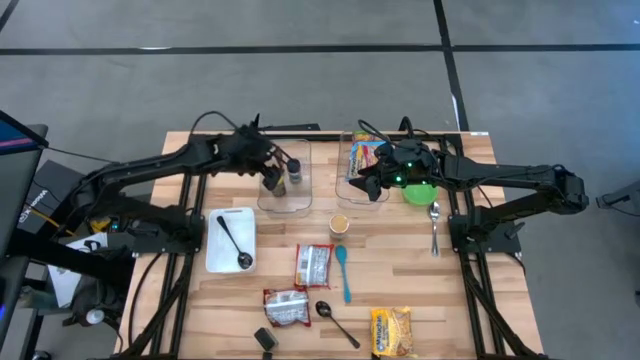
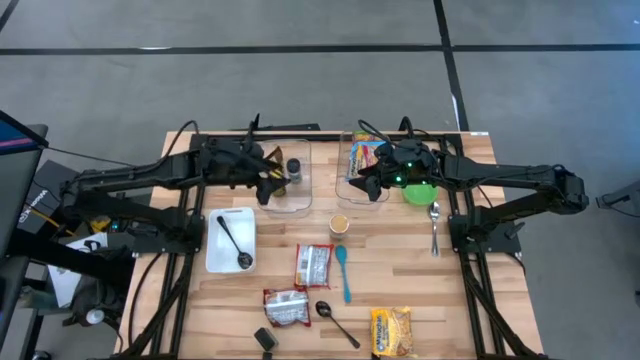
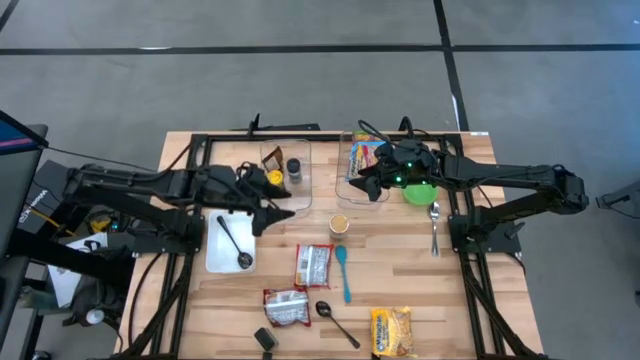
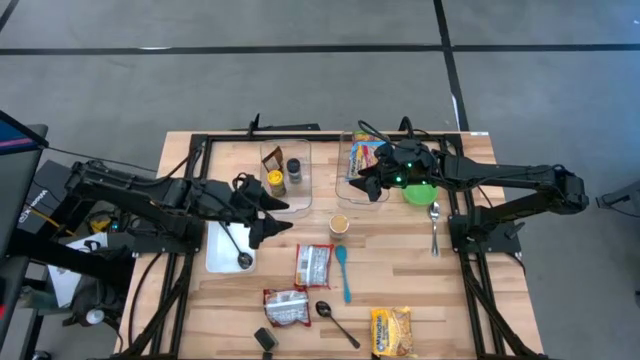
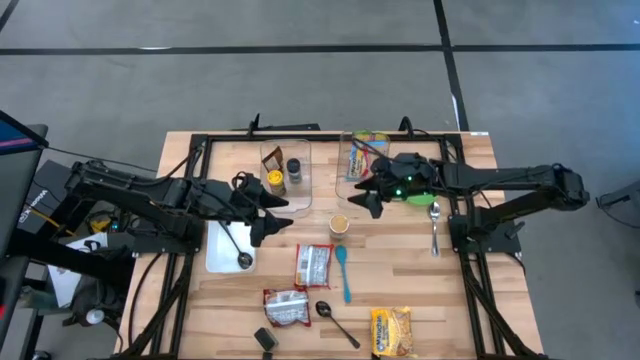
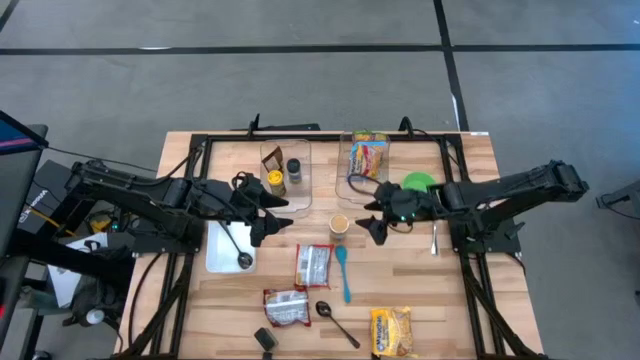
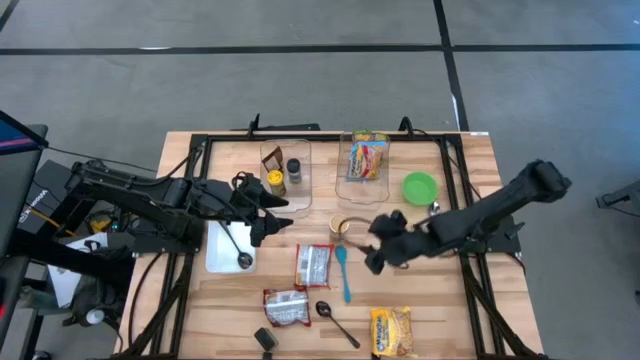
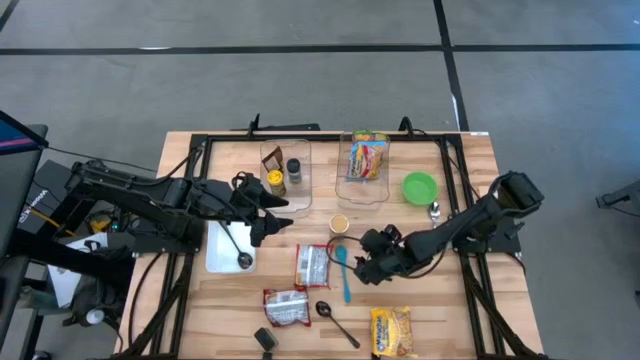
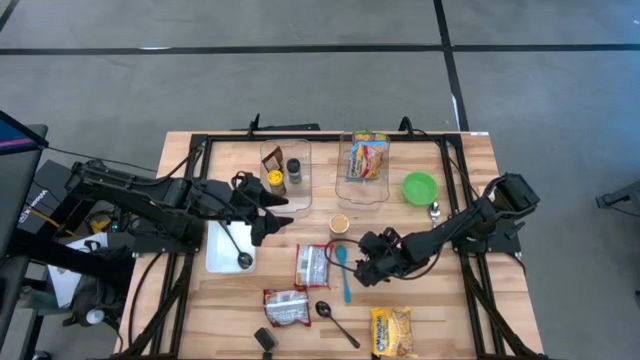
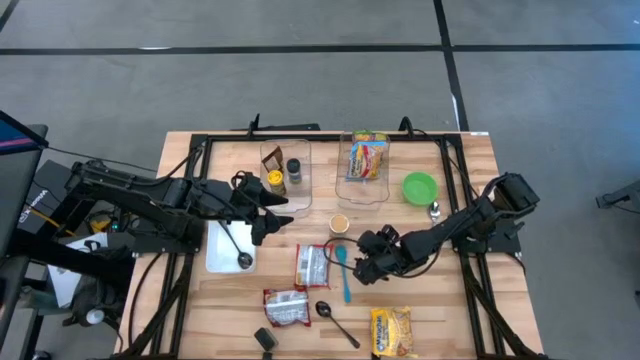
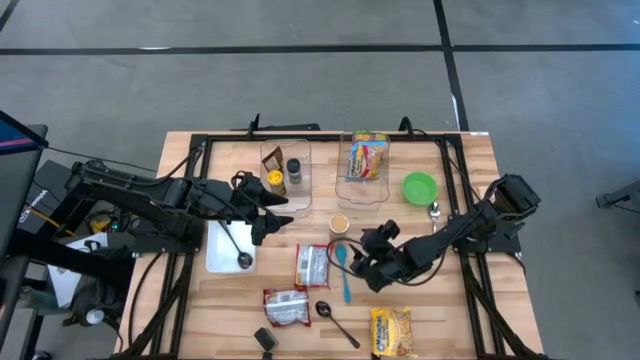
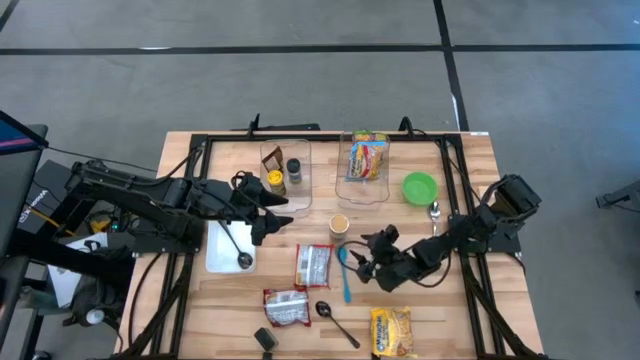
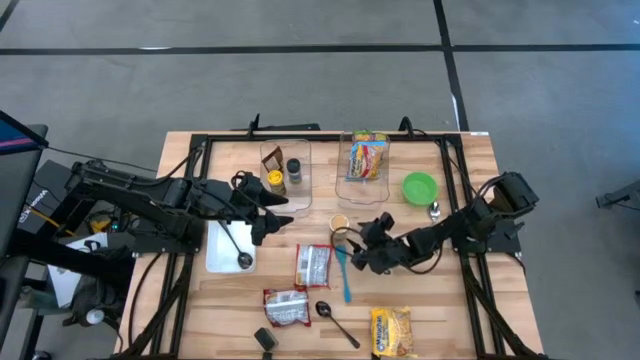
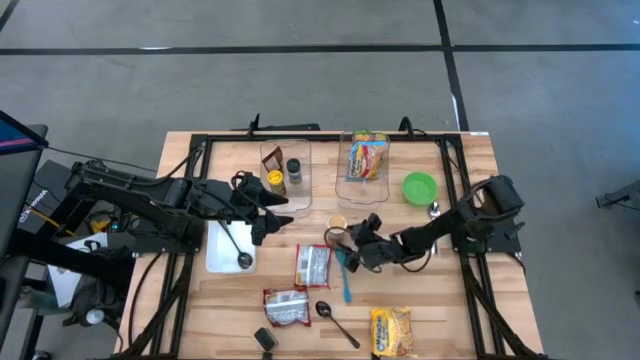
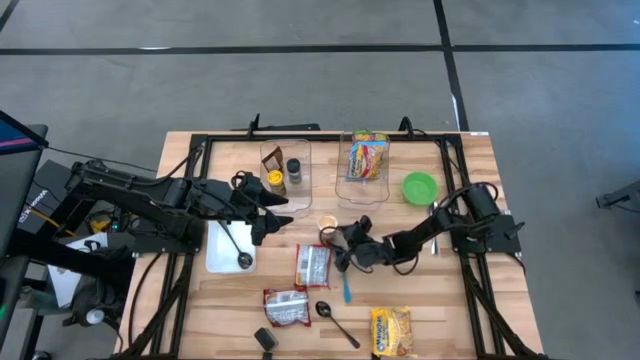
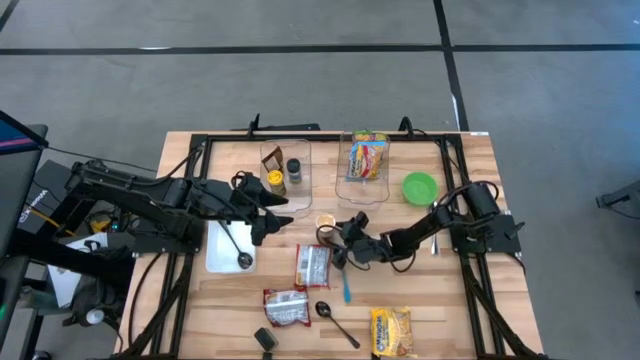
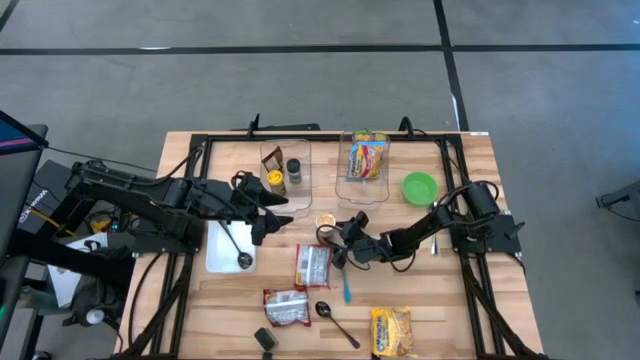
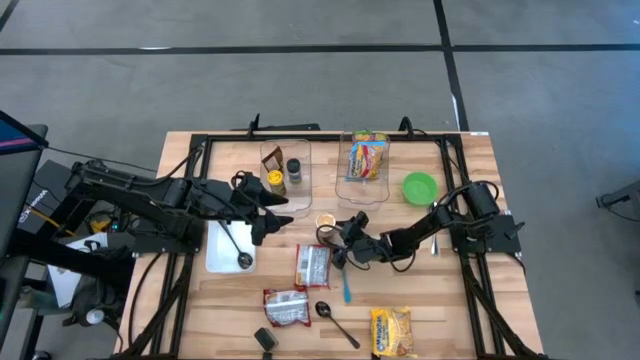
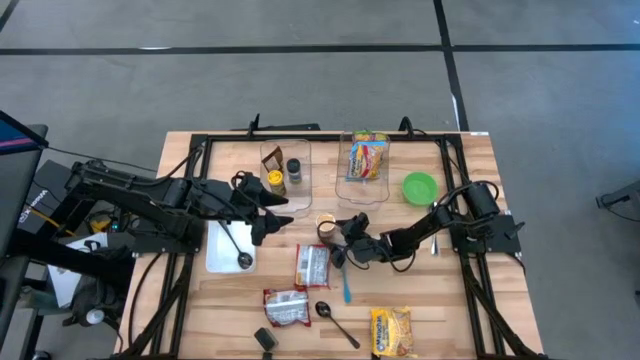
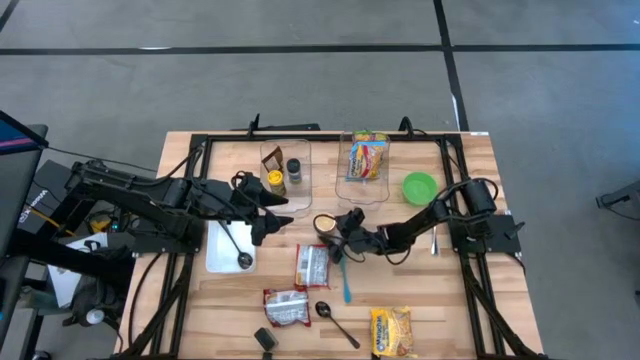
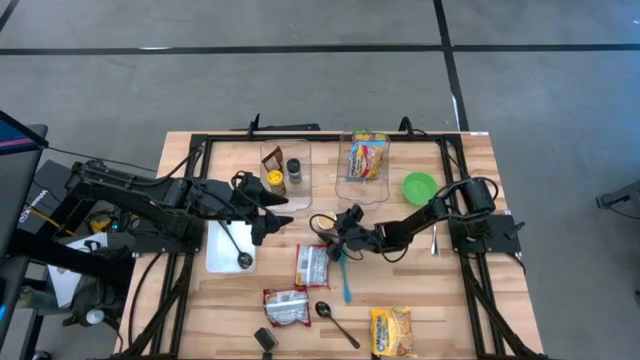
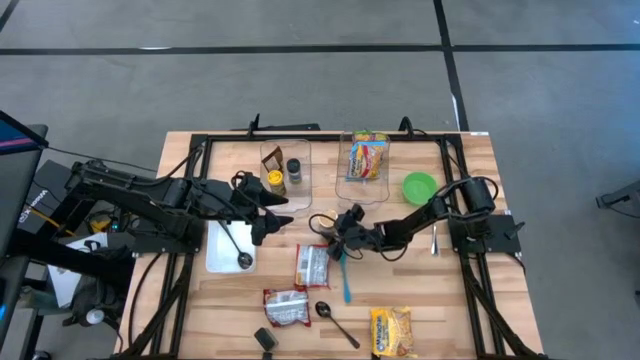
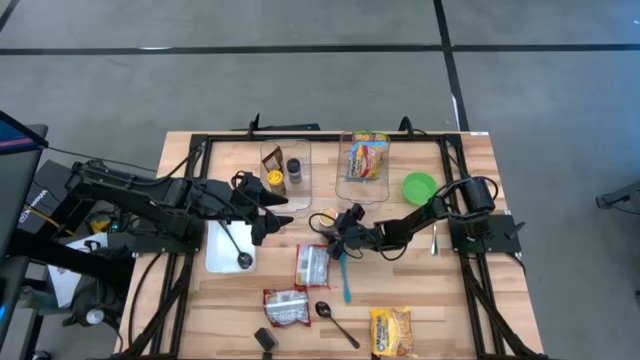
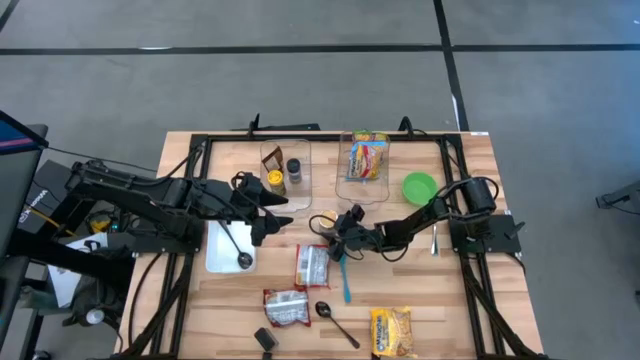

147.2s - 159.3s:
Task: Pick & Place Food Item
Put the gold seasoning bottle into the left transparent bin

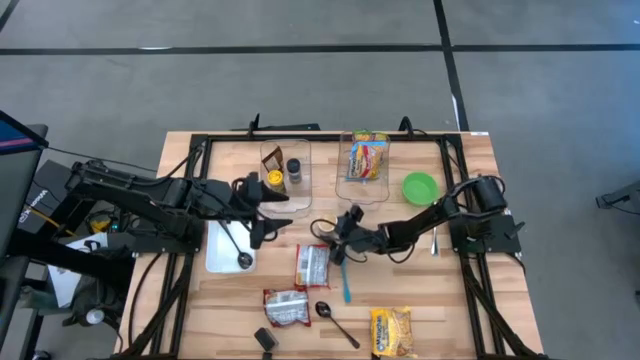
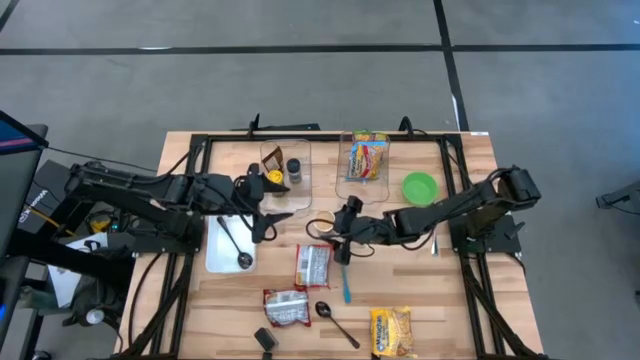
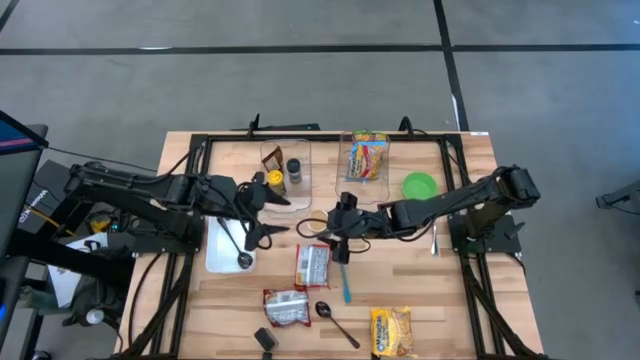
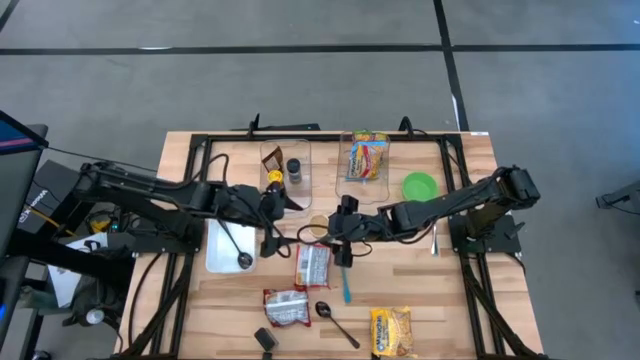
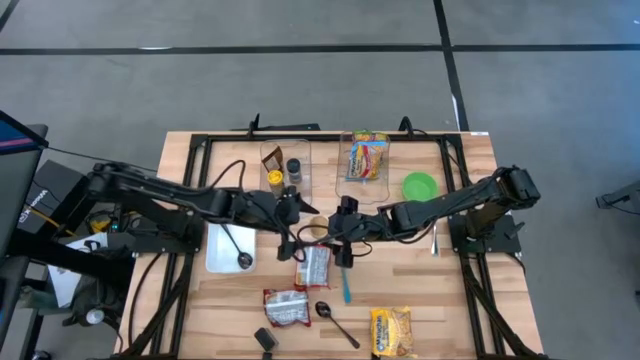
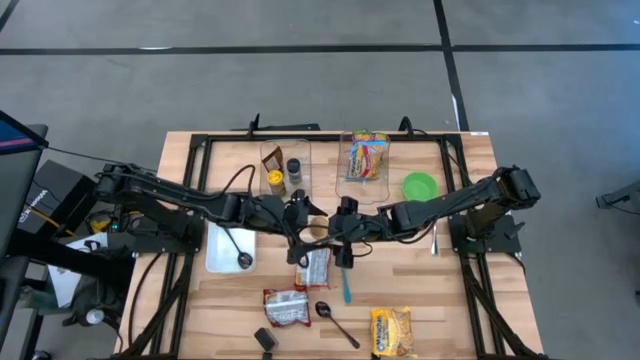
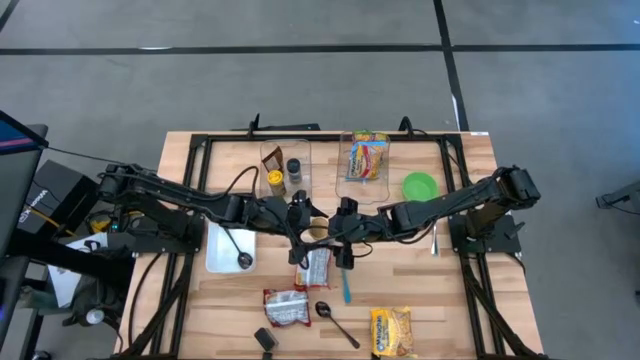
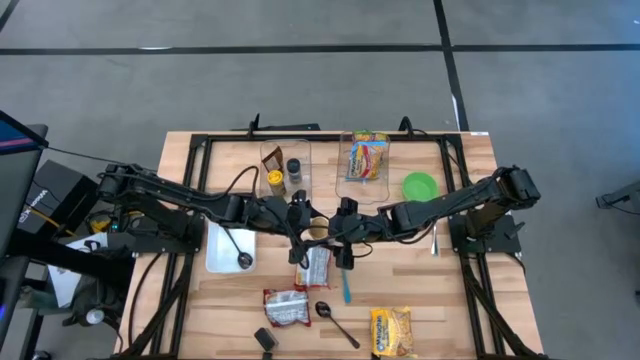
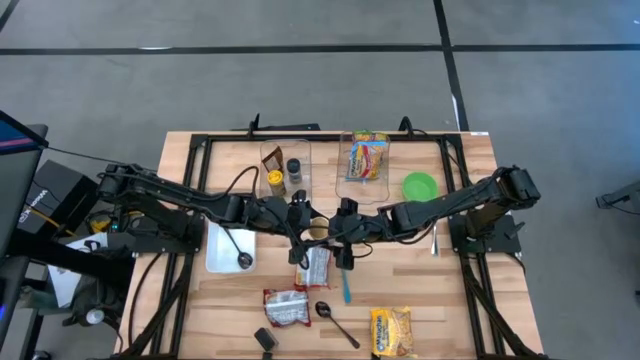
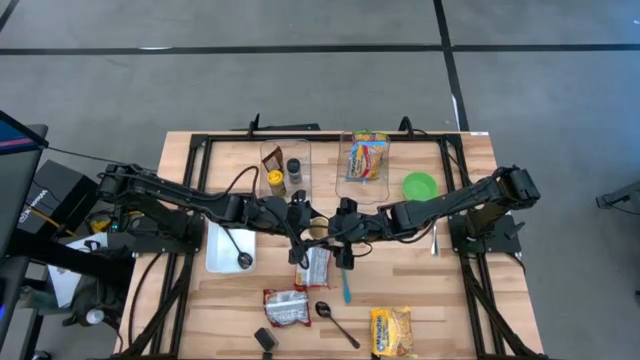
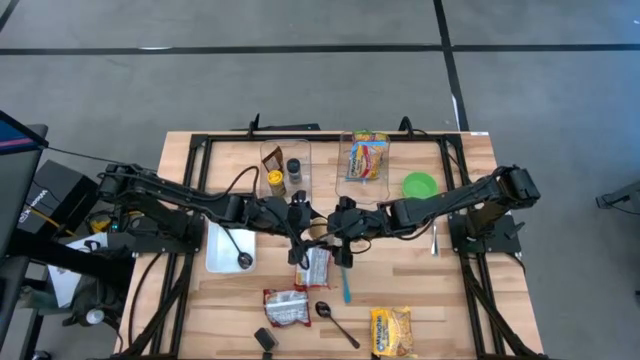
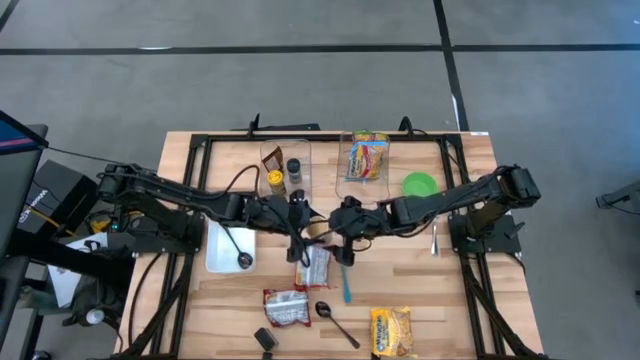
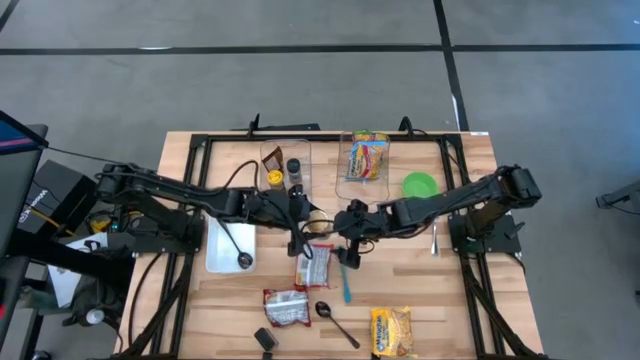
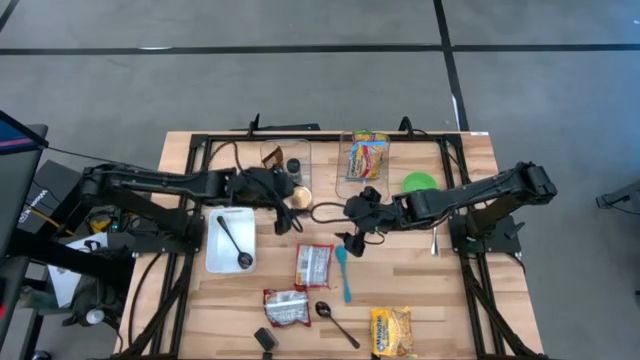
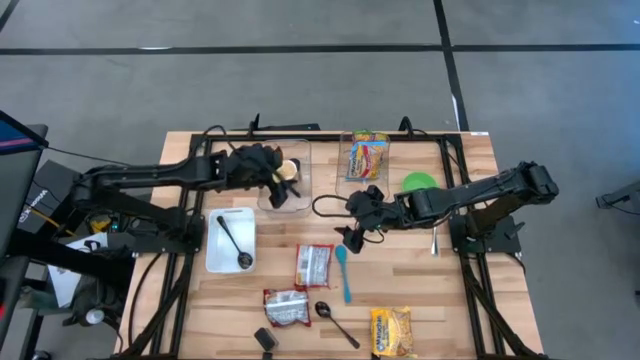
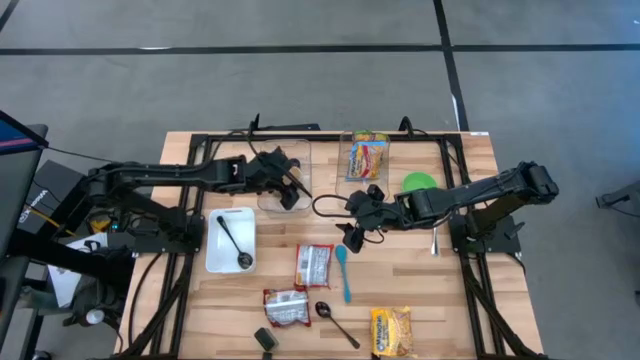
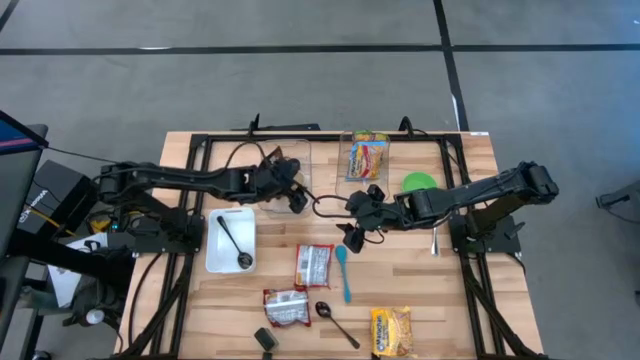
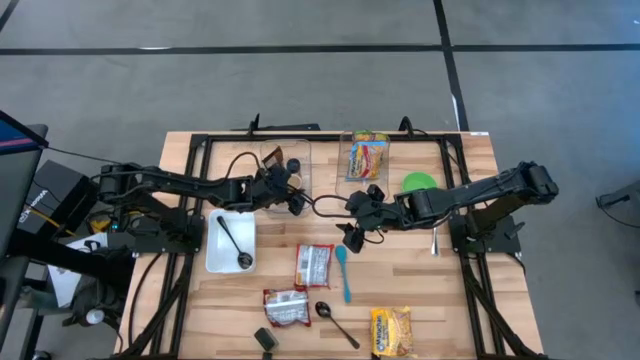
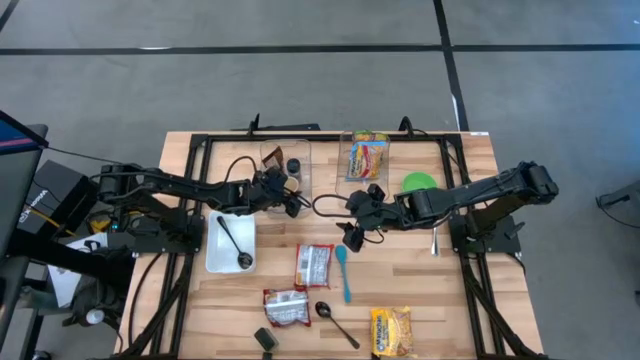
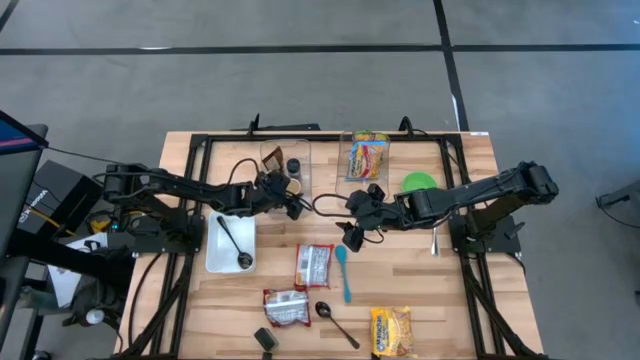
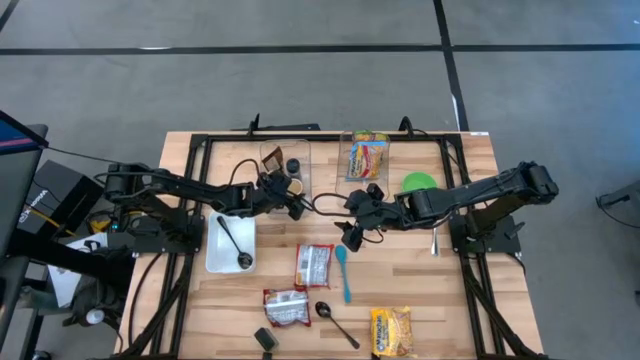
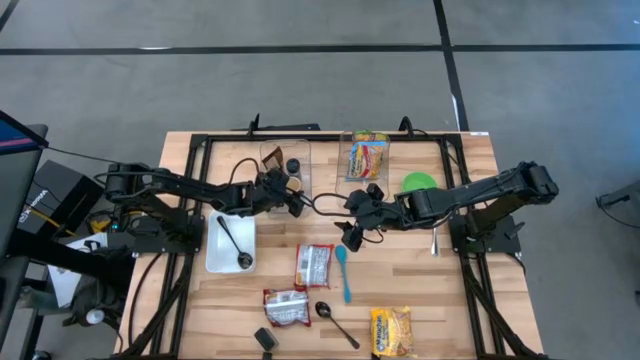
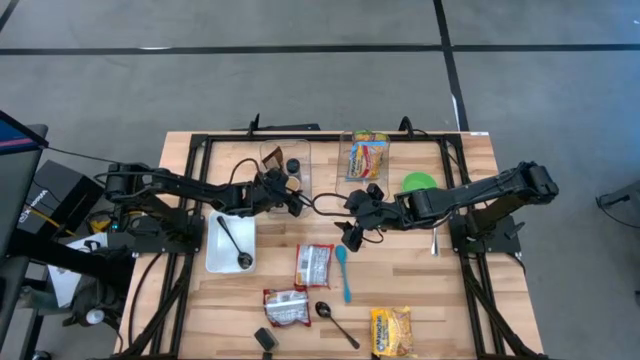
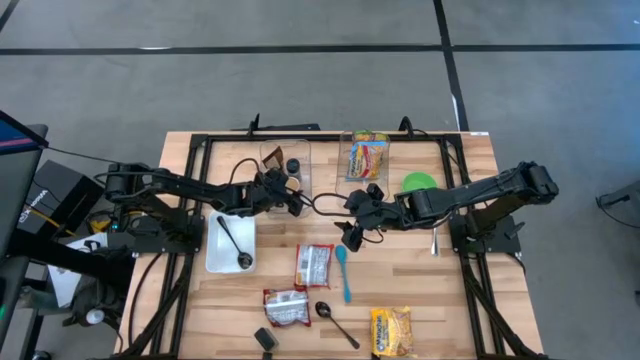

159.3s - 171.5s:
Put the gold seasoning bottle into the left transparent bin
